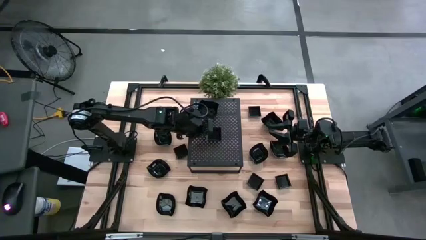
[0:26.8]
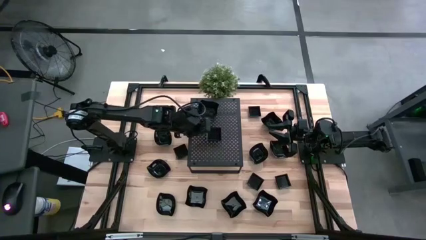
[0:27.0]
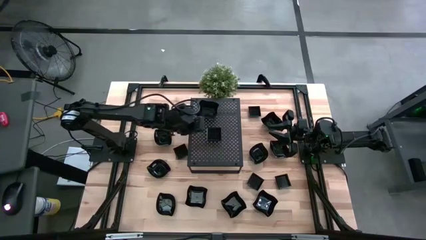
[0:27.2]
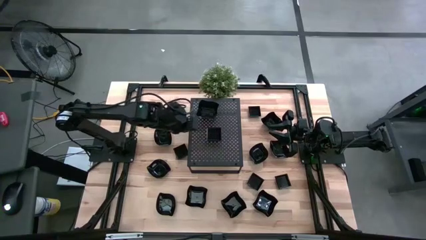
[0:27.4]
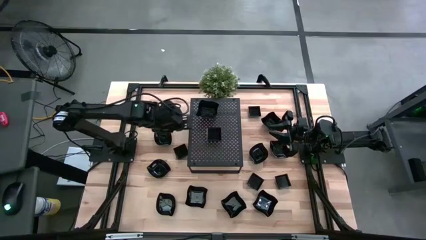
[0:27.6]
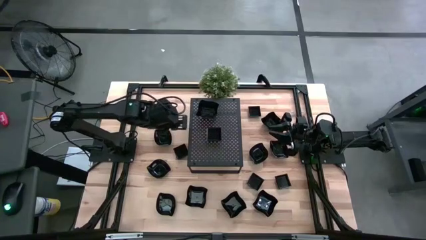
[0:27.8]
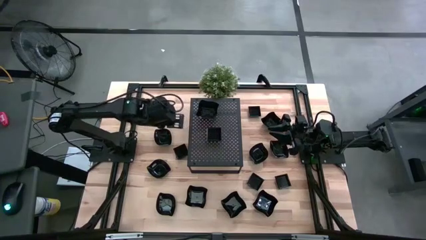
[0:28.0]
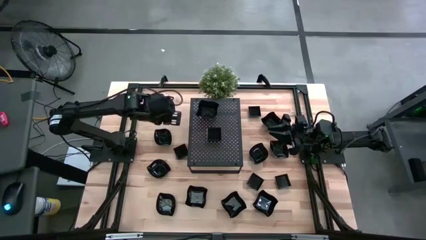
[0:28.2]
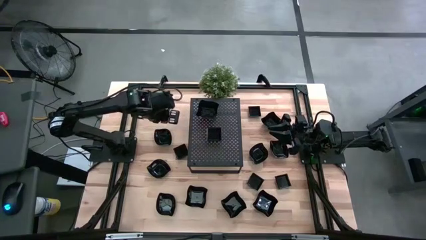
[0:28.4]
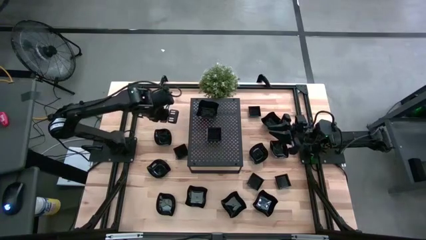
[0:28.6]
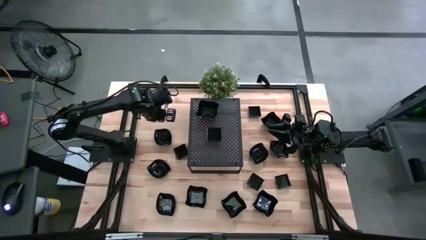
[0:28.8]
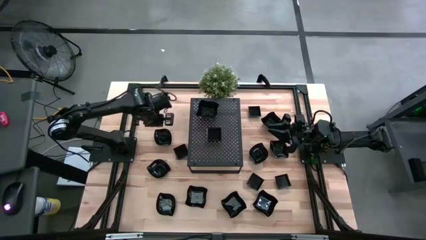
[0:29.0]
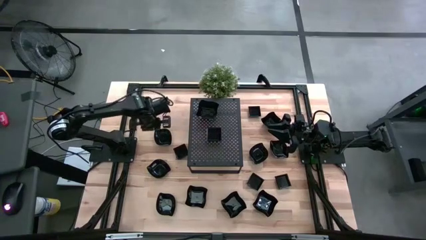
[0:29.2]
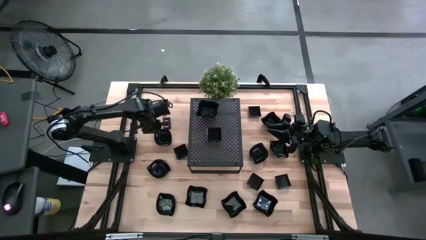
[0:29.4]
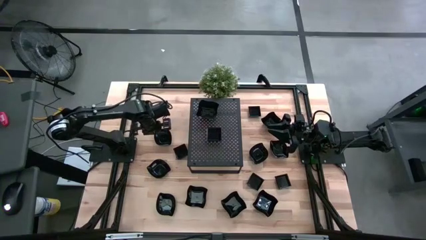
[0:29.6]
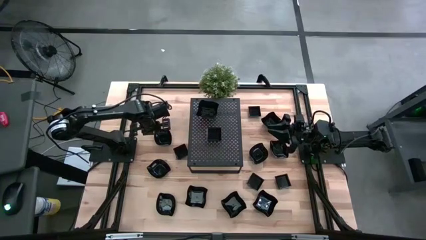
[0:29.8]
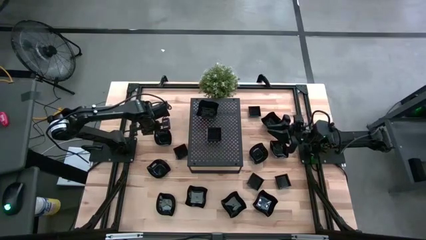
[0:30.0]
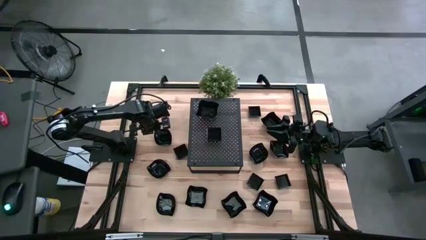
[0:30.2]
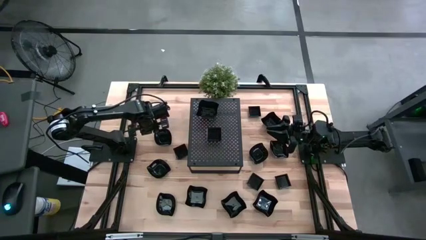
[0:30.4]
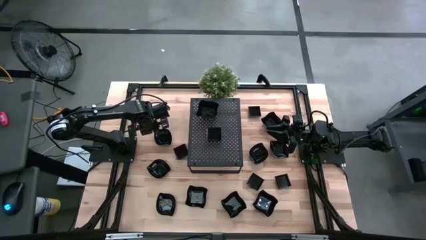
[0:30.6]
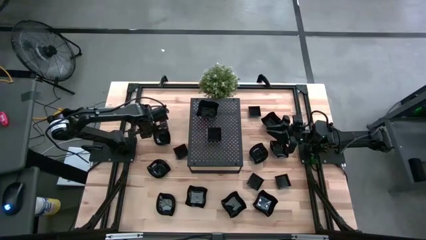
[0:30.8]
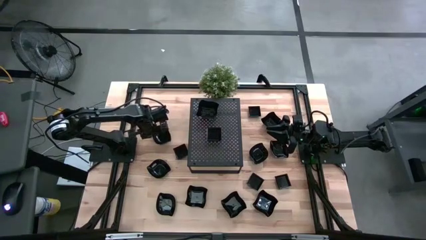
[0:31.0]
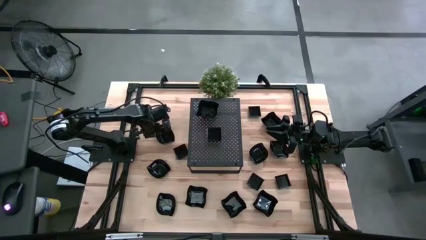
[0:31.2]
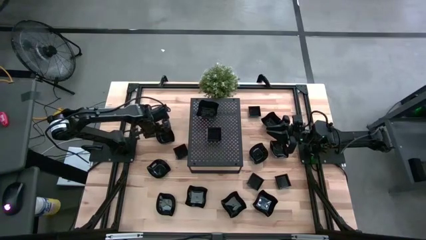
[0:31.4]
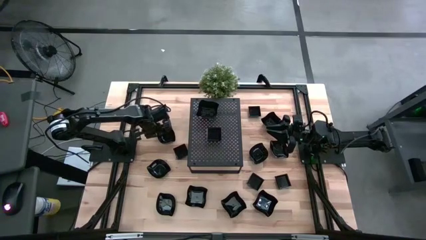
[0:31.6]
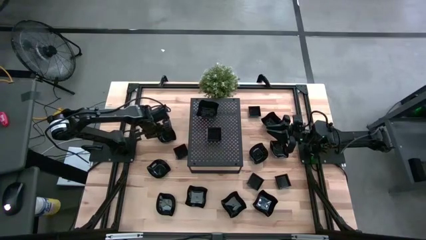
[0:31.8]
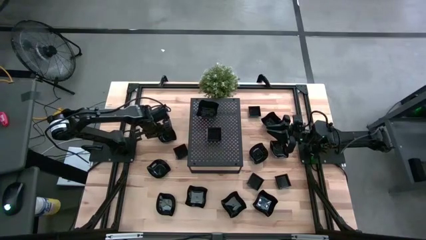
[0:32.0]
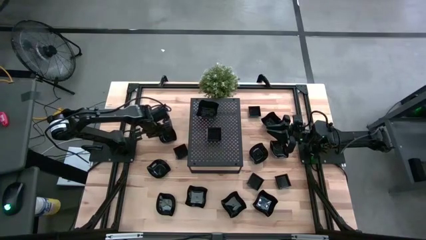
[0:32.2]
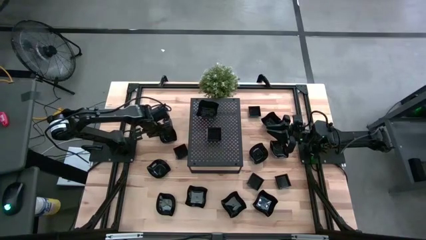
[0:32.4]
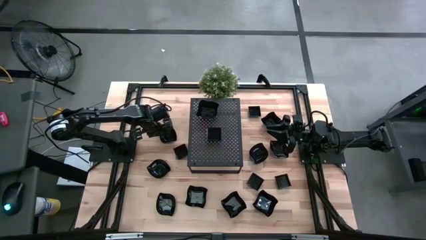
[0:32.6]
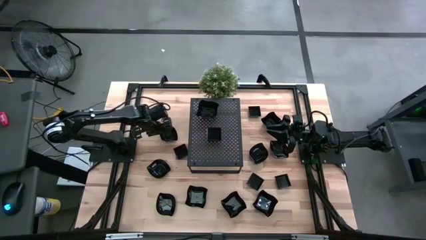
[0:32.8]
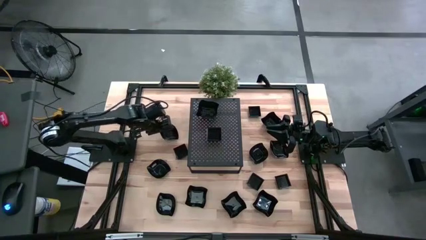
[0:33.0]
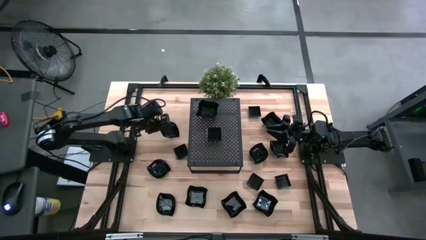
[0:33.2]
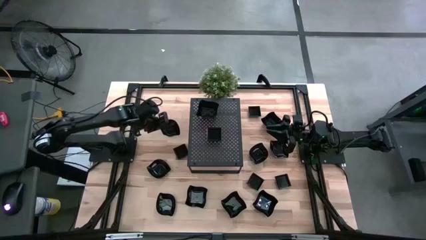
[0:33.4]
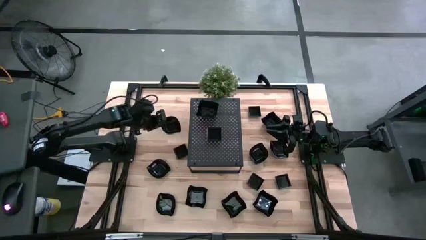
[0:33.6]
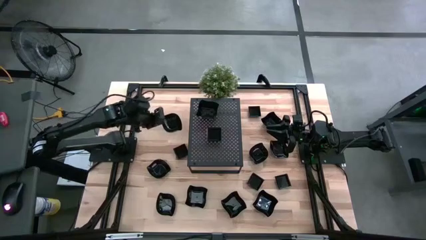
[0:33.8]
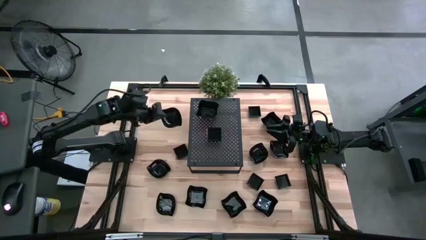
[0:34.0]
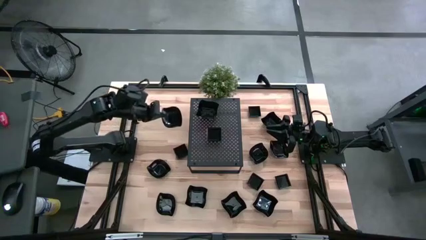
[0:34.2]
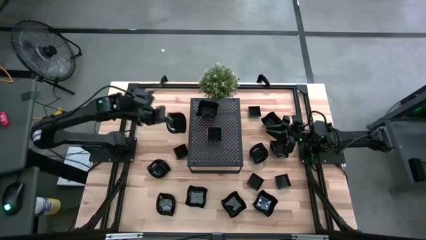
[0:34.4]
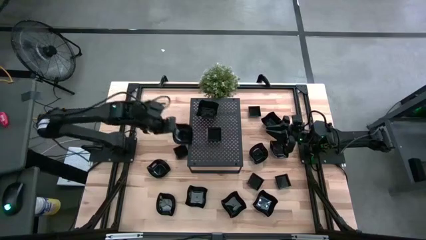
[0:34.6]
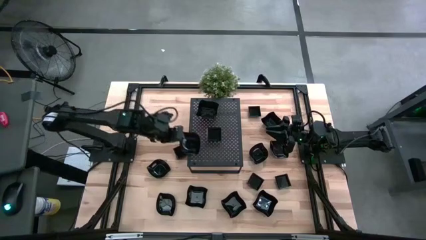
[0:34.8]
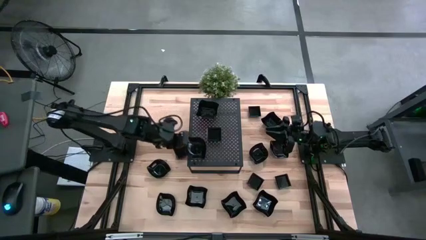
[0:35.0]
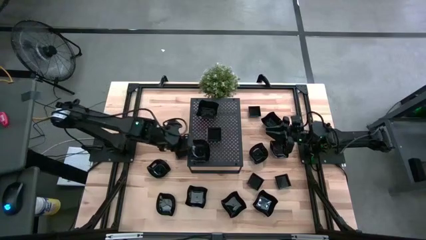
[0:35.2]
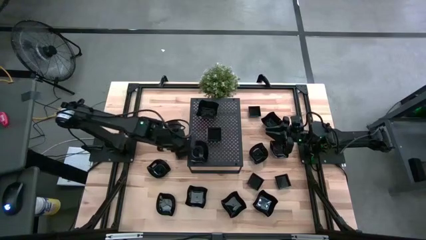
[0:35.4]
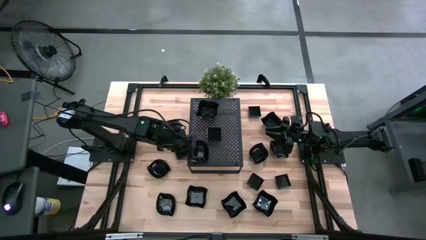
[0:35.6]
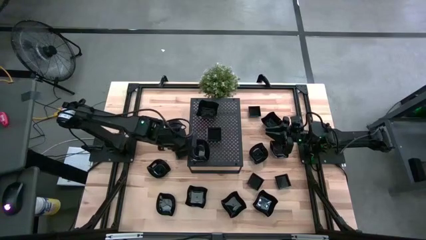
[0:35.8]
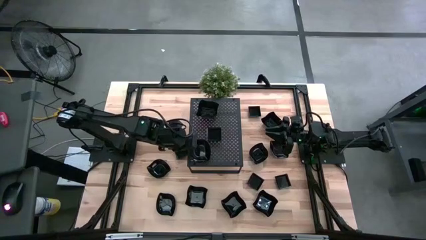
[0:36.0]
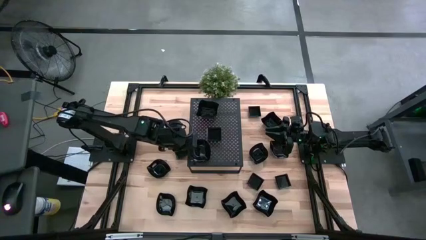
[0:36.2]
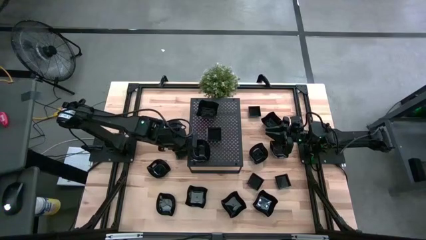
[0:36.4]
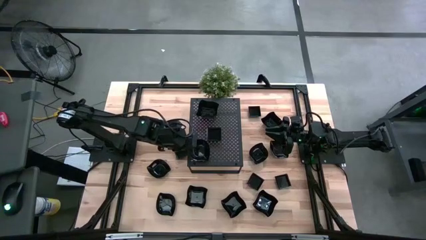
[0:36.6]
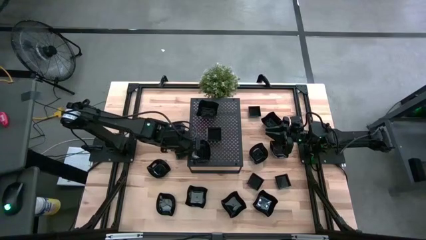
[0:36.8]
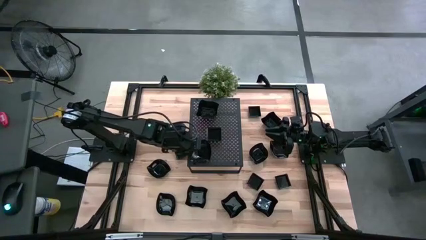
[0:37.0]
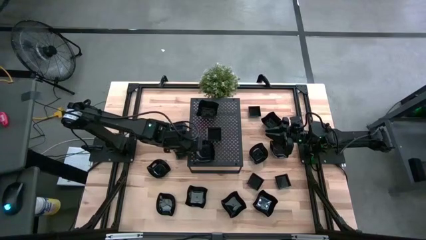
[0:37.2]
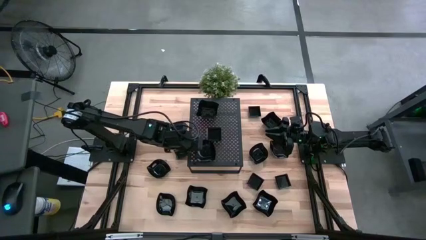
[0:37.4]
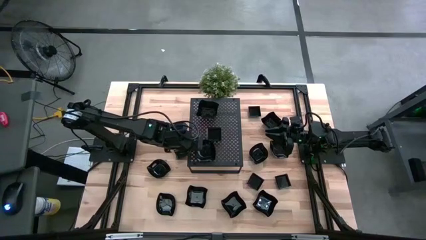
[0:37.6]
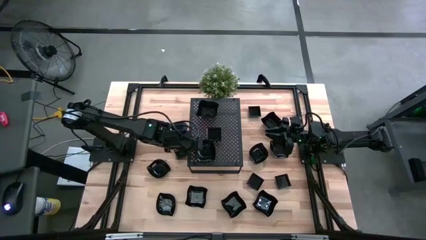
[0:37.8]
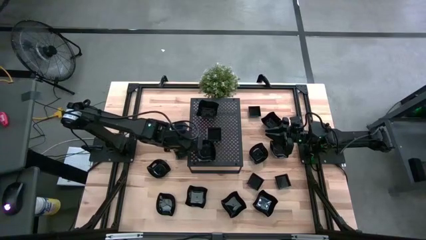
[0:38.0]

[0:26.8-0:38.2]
Task: Pick & Place Mini shaped plates
Put the leaf-shaped plate on the shelf

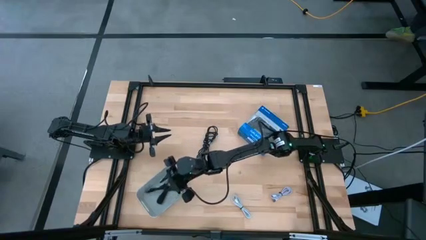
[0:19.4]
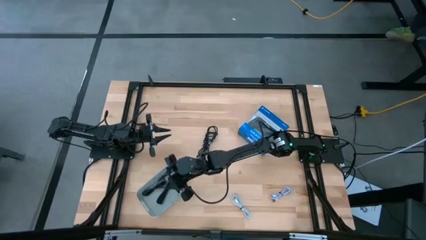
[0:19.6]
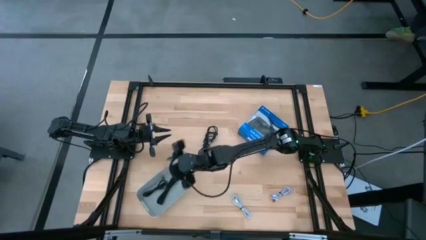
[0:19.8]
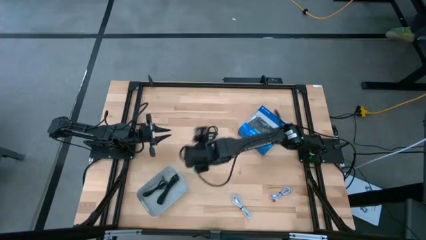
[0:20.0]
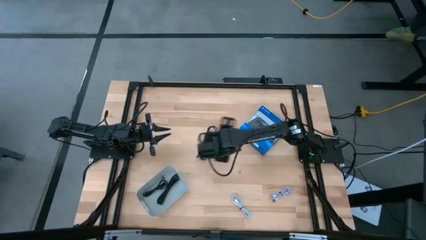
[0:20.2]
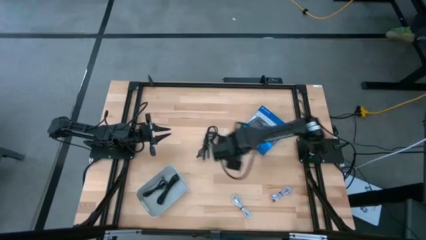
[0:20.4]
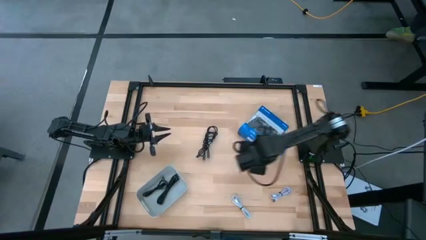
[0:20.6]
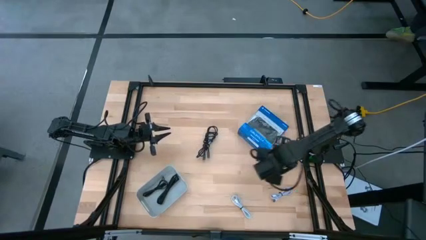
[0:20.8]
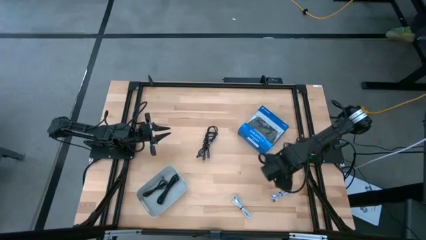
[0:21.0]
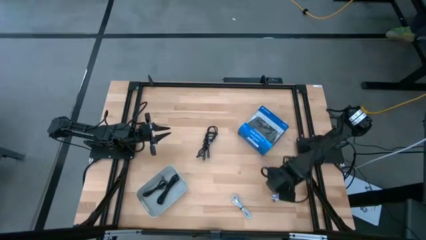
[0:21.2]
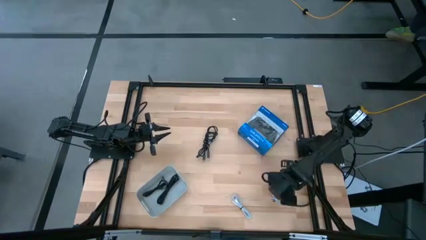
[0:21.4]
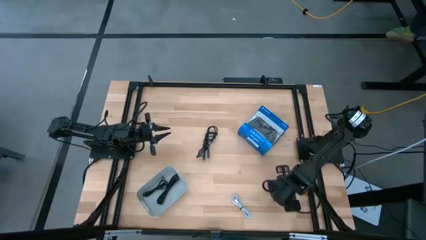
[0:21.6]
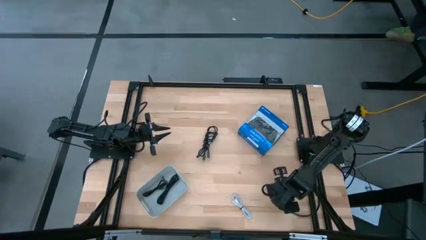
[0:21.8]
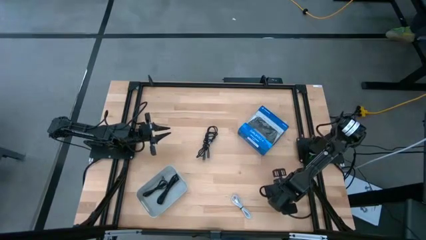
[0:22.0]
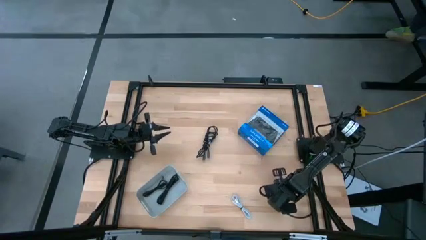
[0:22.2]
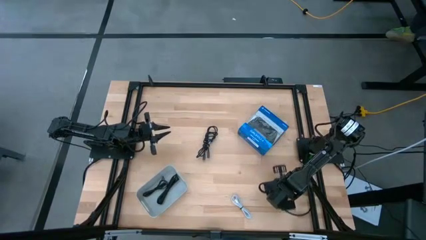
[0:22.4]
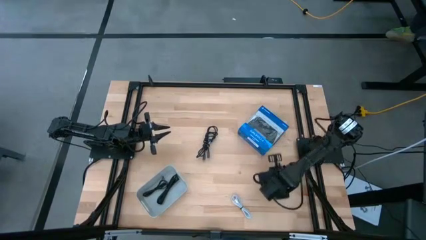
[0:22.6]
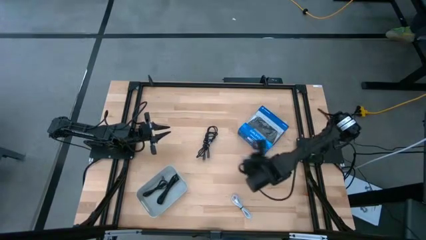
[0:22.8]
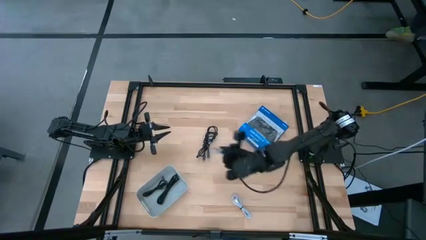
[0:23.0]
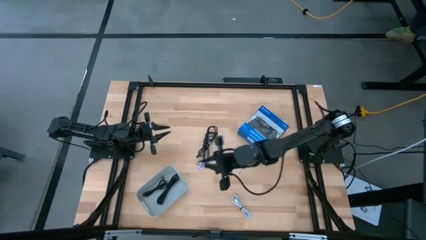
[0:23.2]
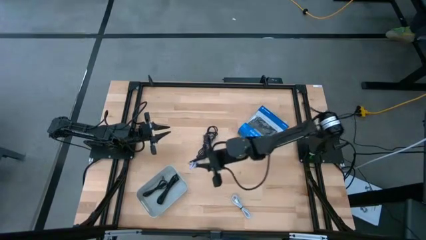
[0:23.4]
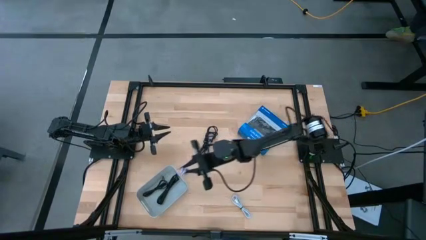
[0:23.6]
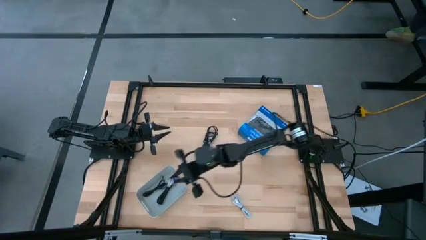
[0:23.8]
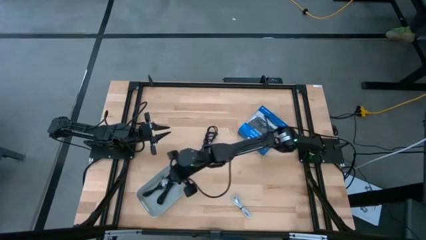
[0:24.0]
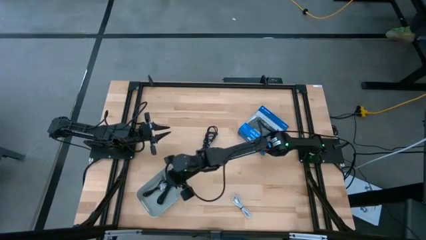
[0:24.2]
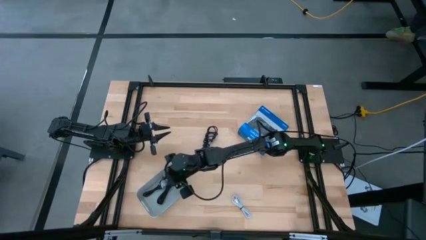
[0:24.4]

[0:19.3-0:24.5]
Task: Pick and place USB-C Cables
Put the right white charger cable into the white bin
